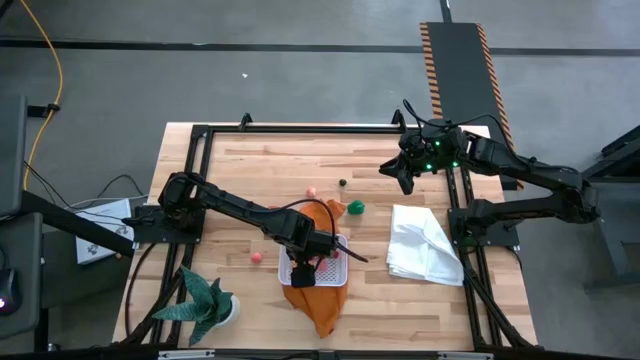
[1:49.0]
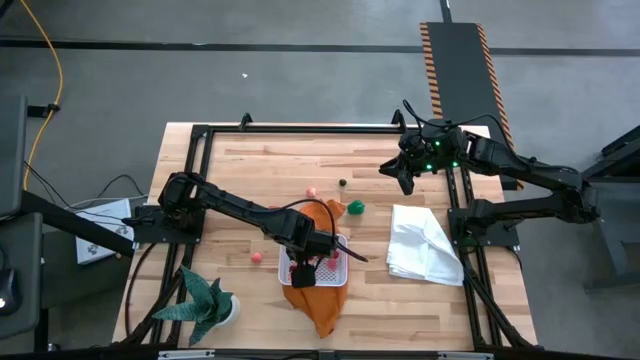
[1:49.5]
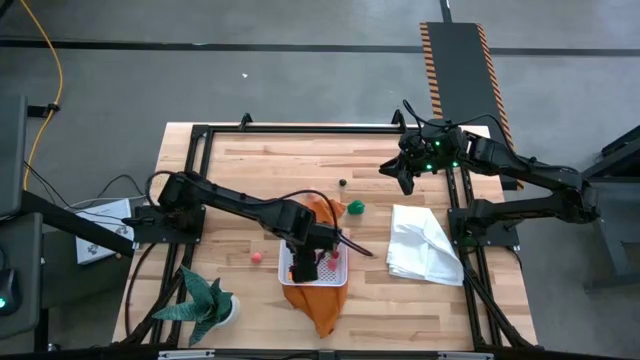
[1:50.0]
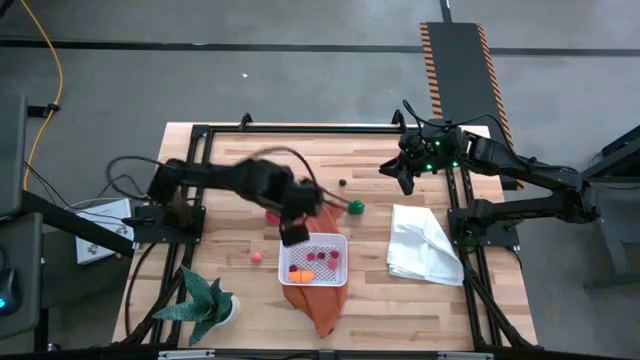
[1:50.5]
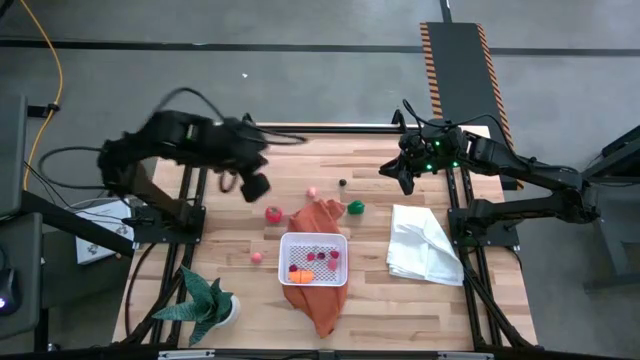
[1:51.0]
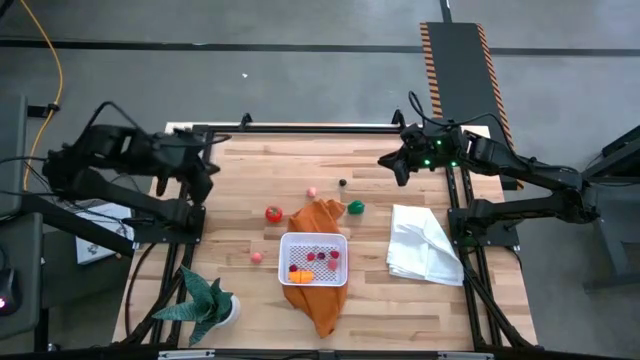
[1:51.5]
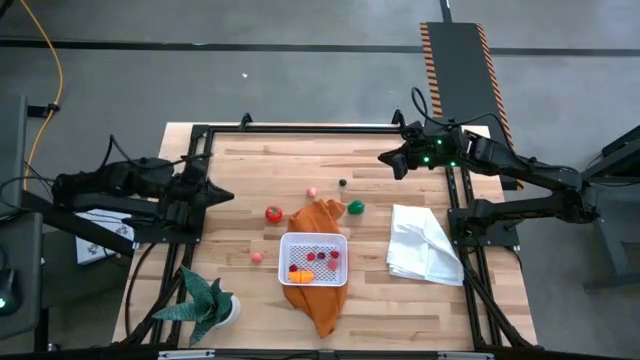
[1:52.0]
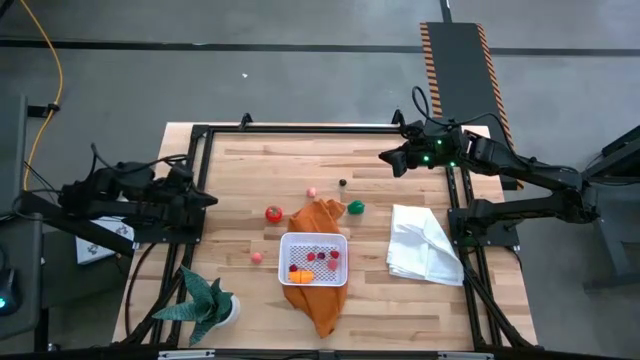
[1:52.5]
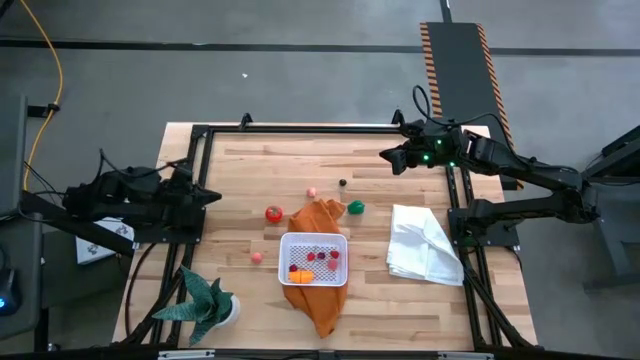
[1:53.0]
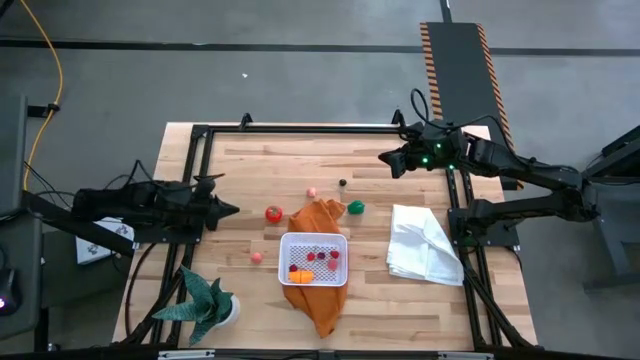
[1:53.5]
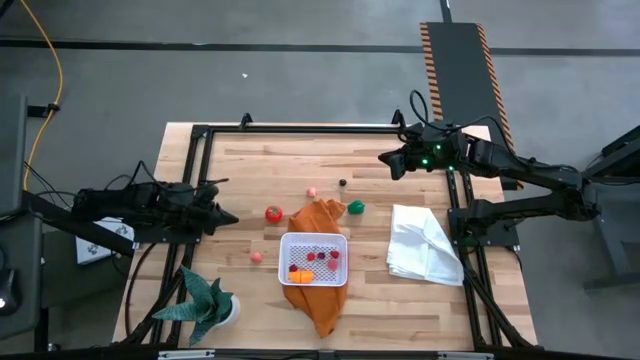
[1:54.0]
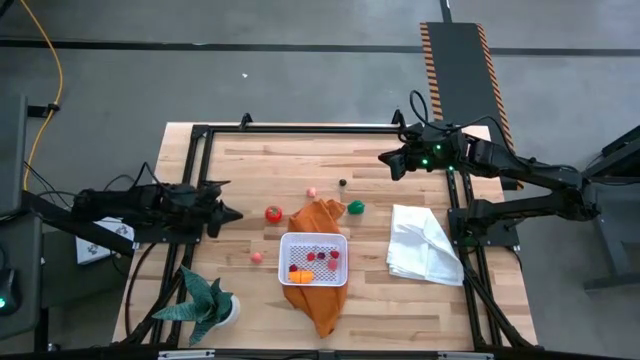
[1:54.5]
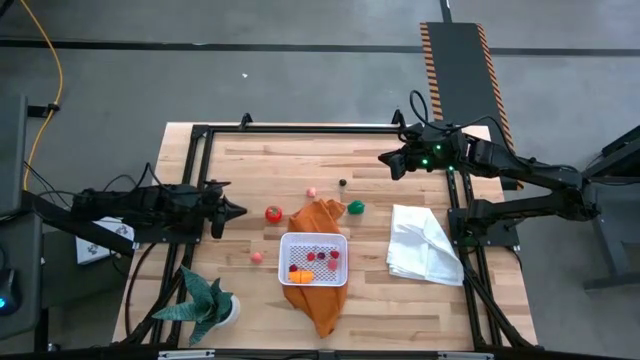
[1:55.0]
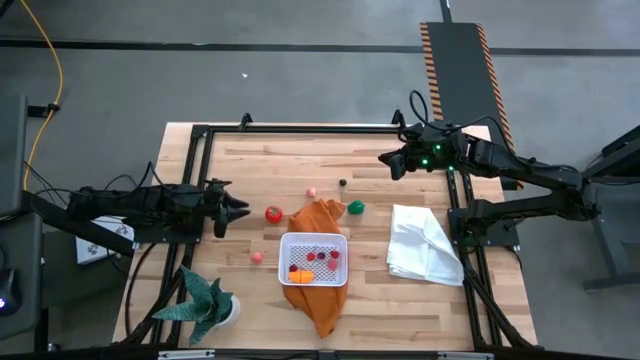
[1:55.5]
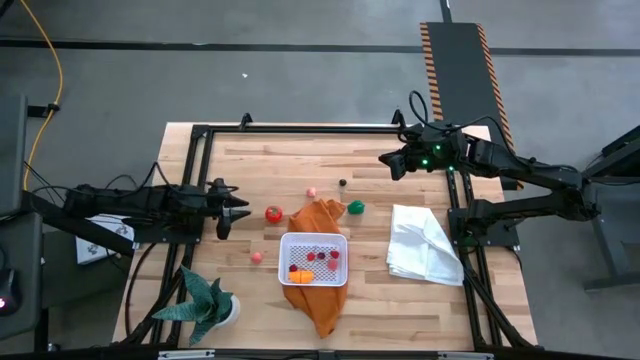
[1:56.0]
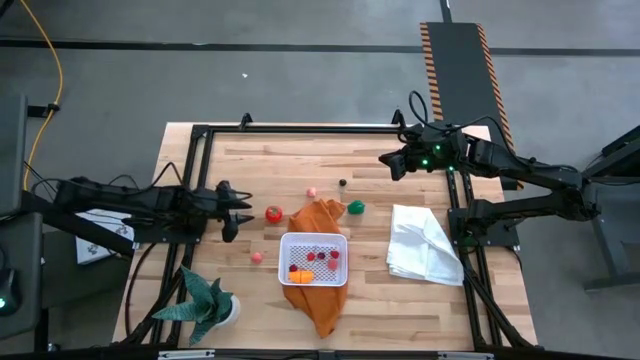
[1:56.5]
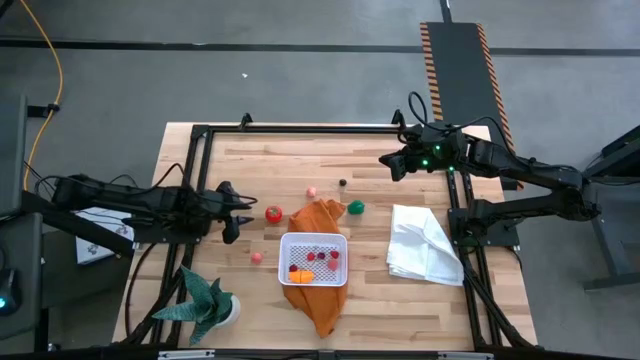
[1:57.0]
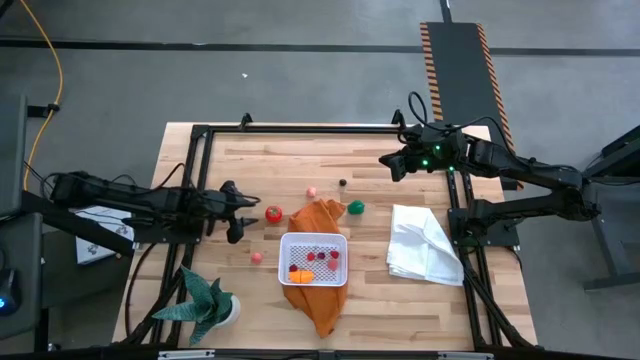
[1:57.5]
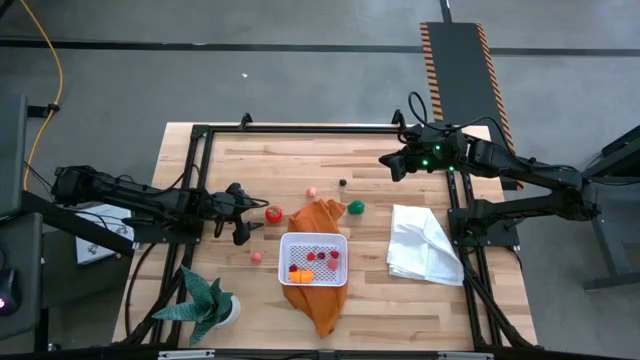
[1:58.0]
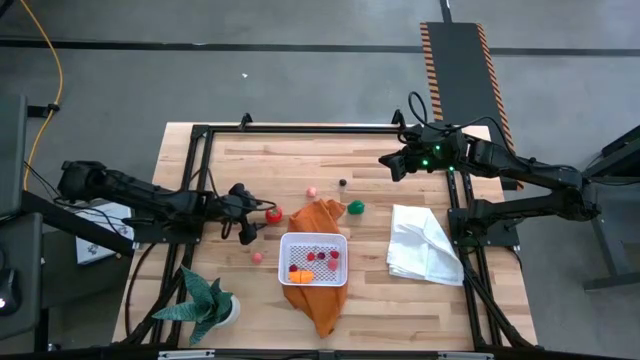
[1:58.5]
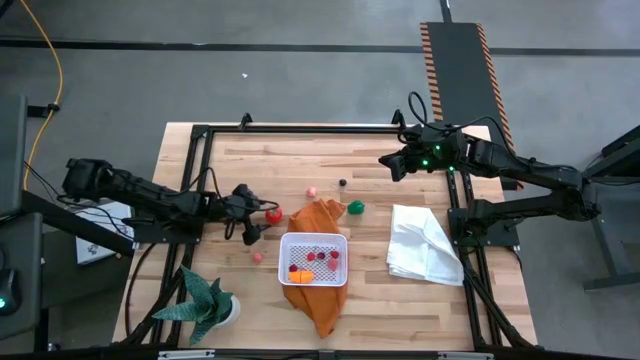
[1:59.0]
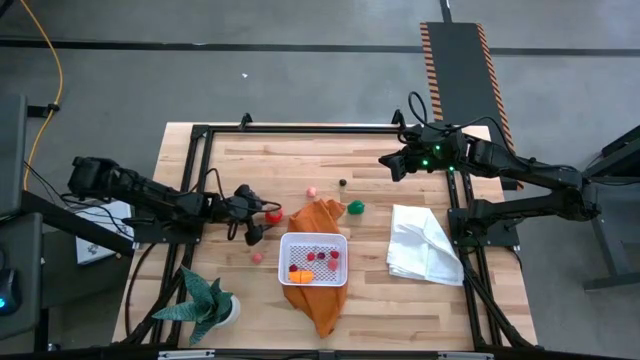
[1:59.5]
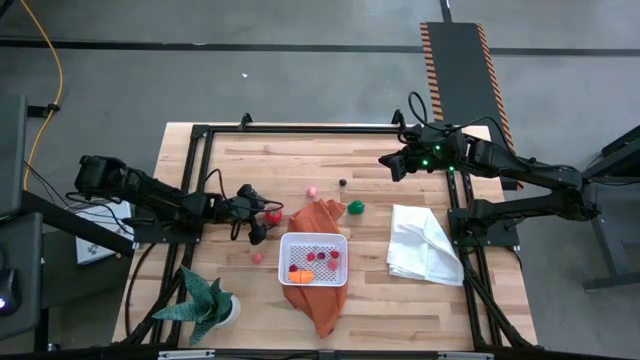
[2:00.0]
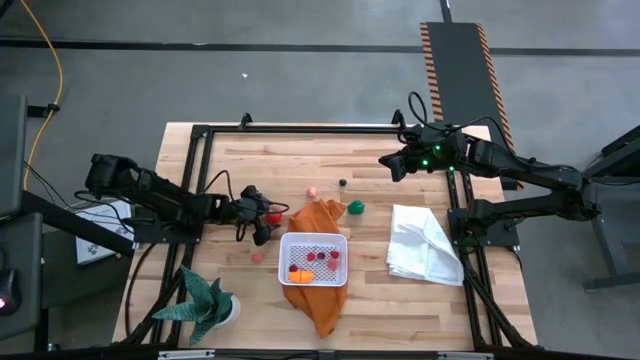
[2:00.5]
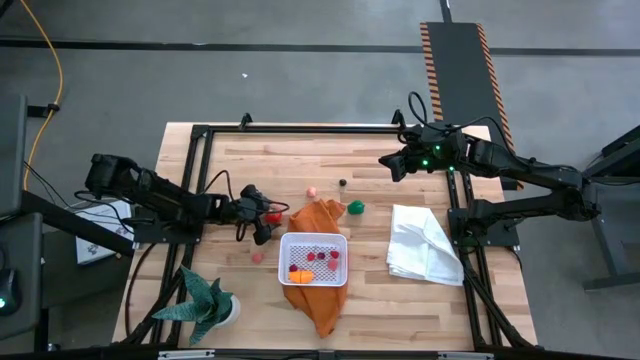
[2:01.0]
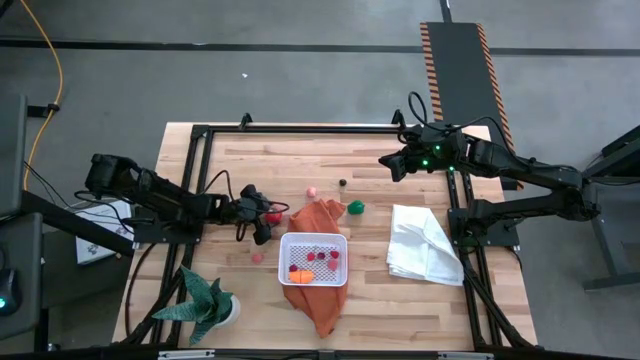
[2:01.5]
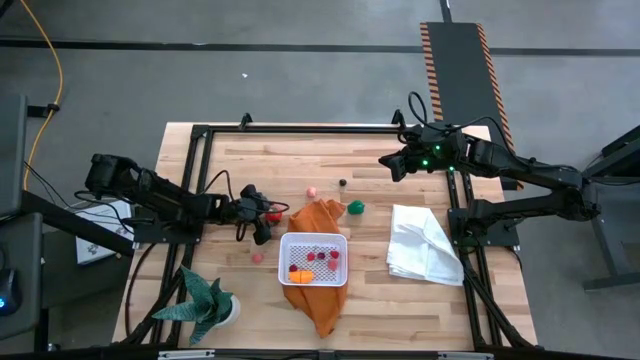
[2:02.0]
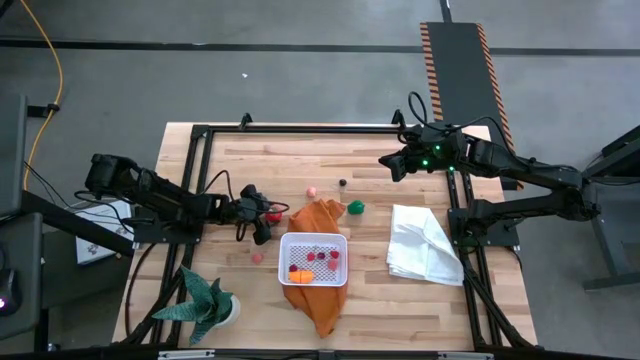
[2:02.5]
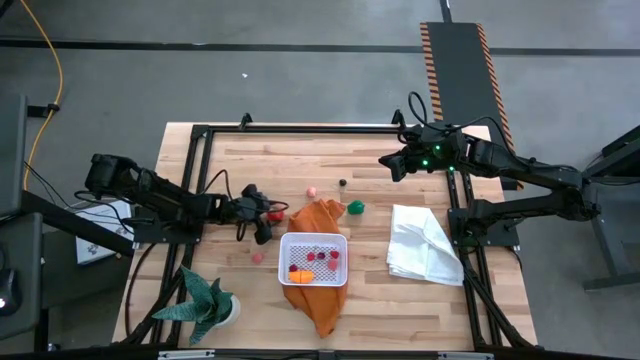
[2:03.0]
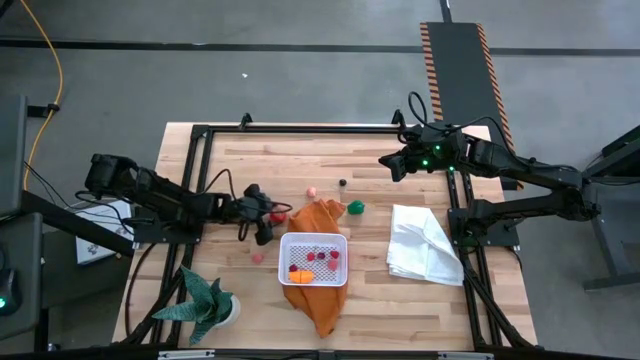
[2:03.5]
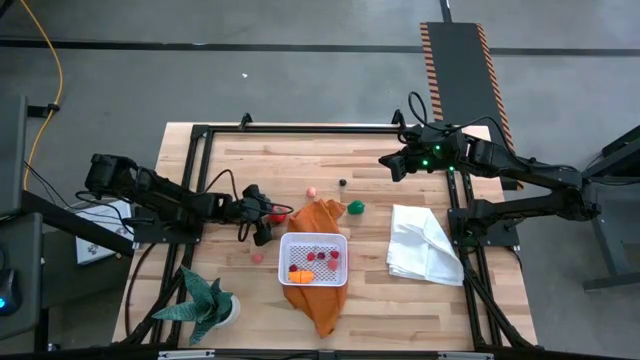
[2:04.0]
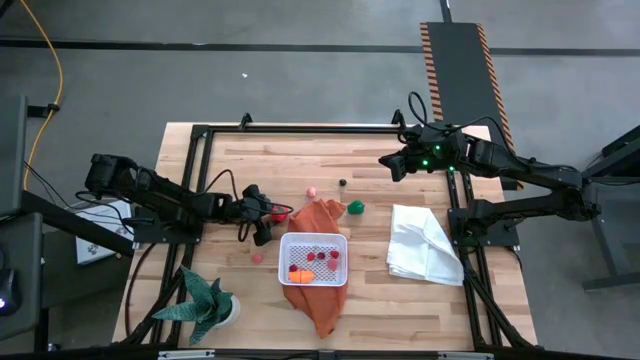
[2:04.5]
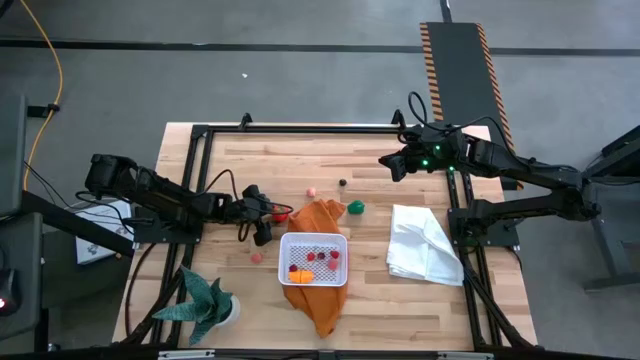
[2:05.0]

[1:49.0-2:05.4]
Task: Pick and placing Produce into tupperware
Put the red tomato into the white basket
